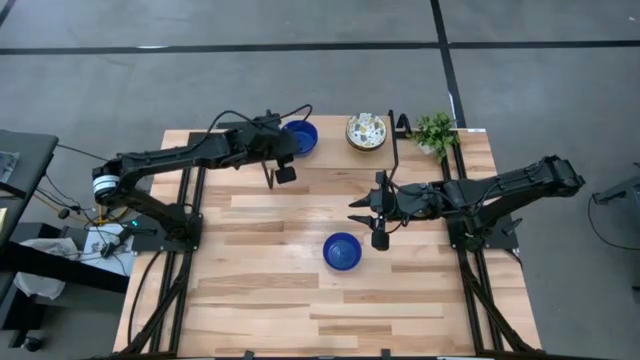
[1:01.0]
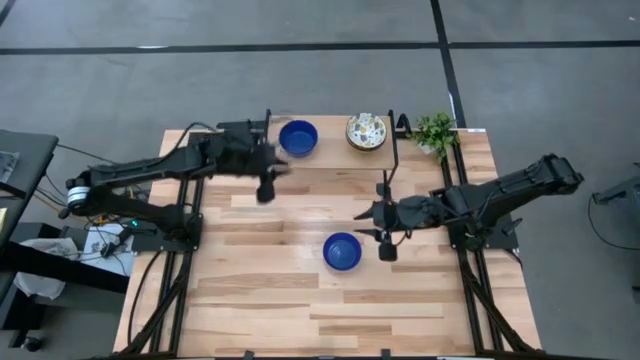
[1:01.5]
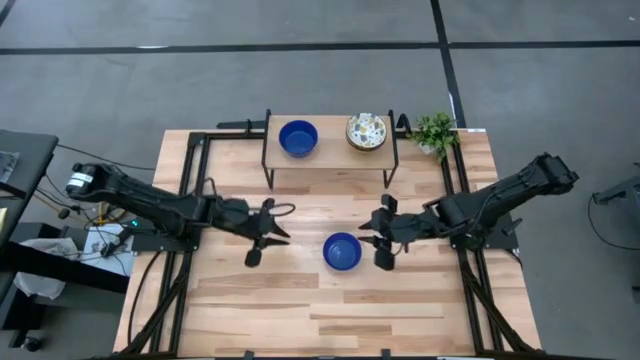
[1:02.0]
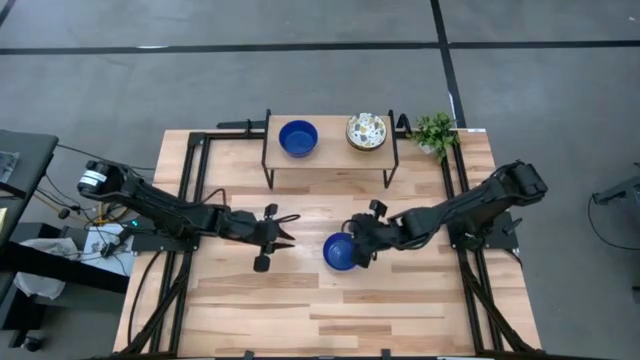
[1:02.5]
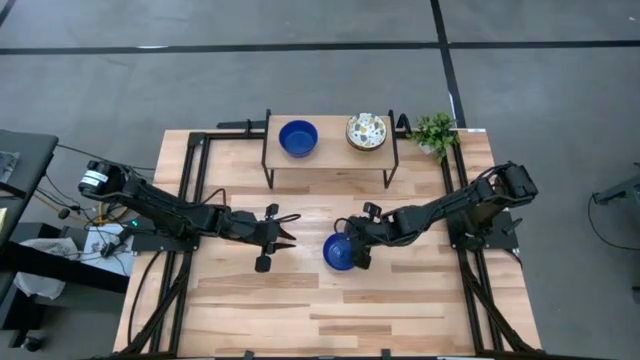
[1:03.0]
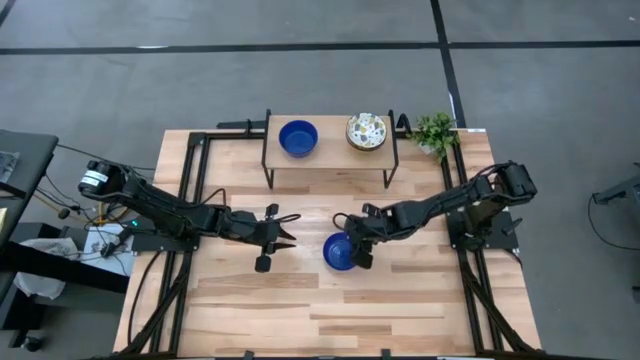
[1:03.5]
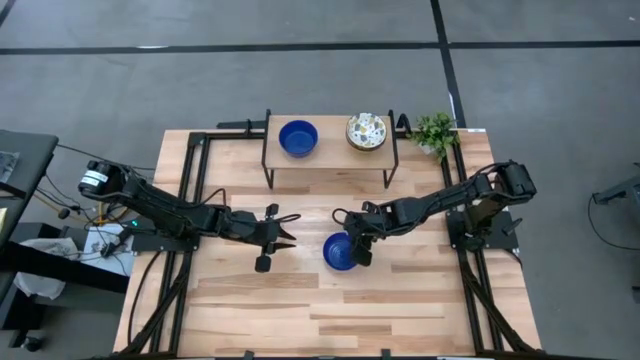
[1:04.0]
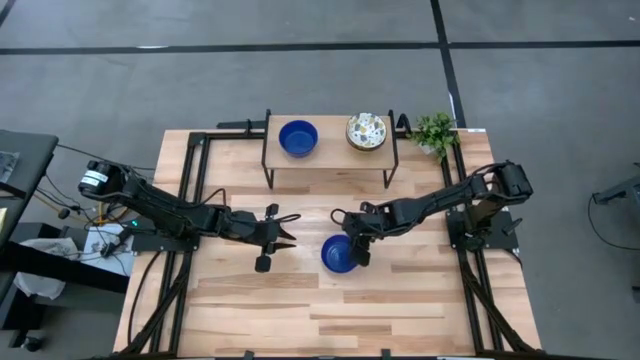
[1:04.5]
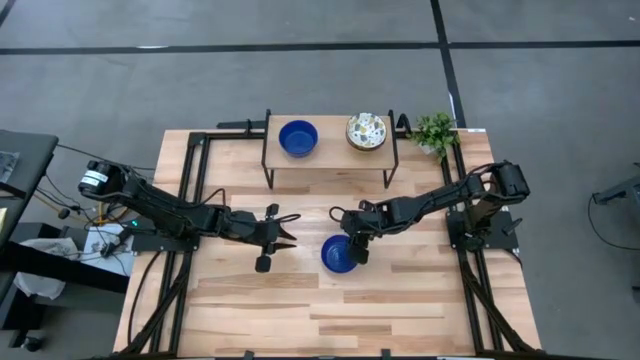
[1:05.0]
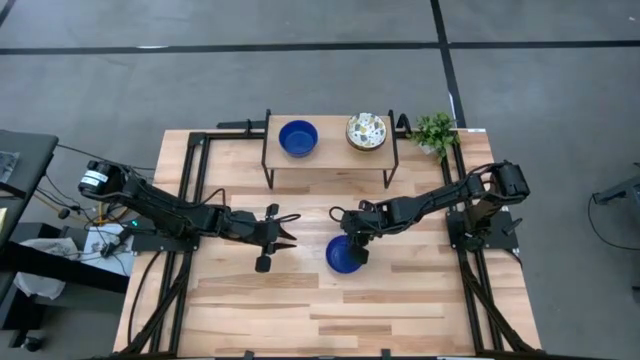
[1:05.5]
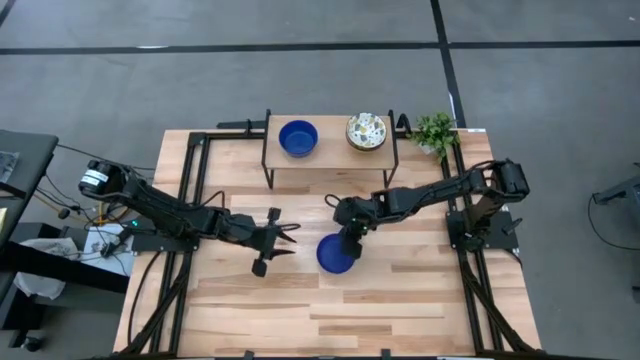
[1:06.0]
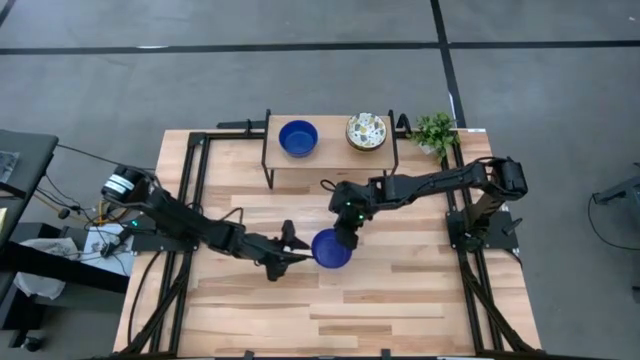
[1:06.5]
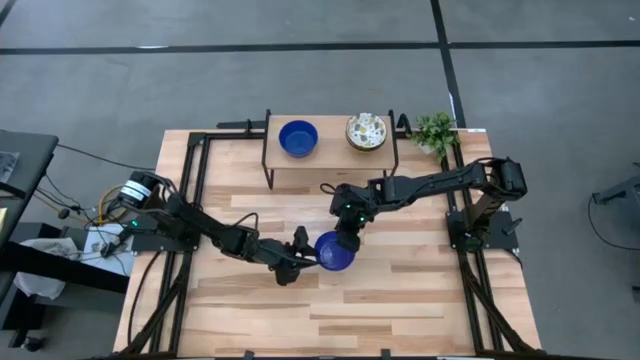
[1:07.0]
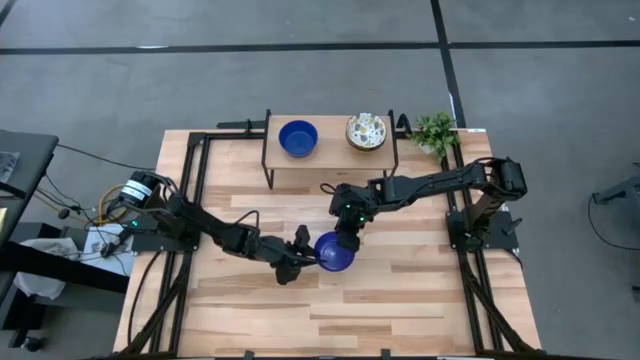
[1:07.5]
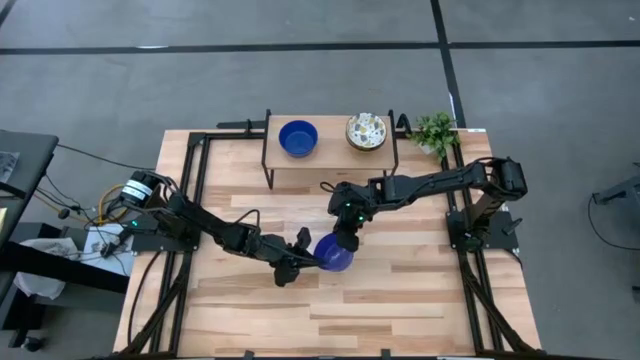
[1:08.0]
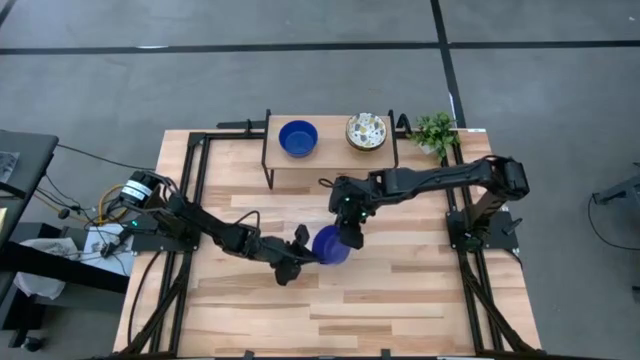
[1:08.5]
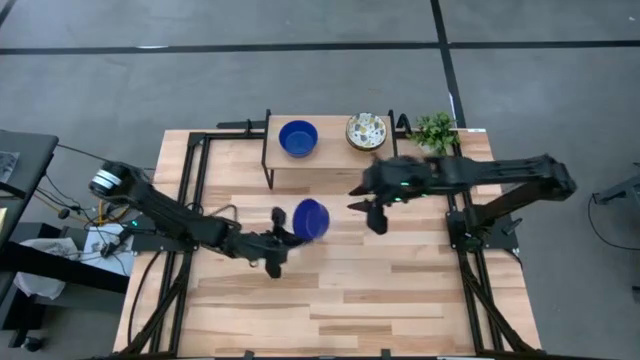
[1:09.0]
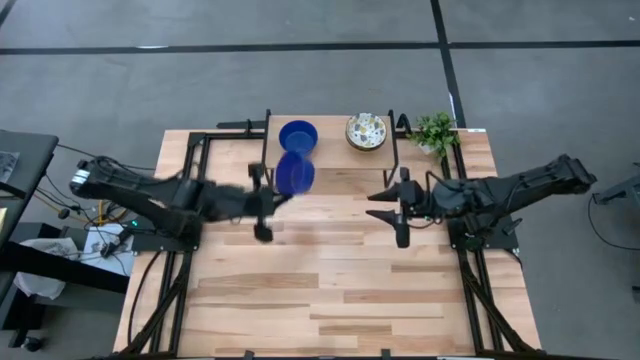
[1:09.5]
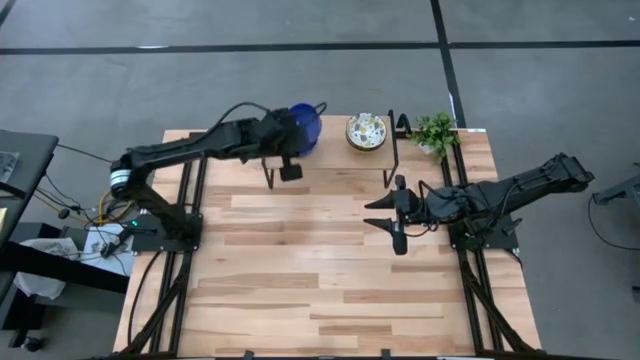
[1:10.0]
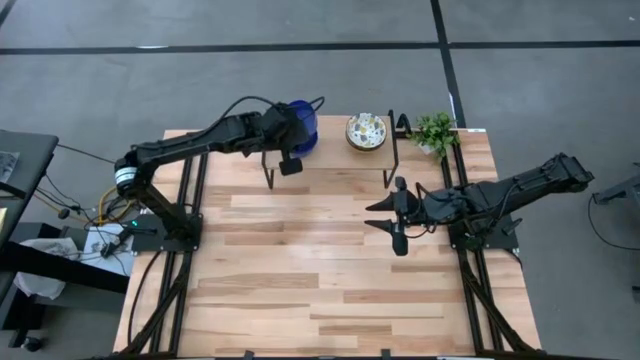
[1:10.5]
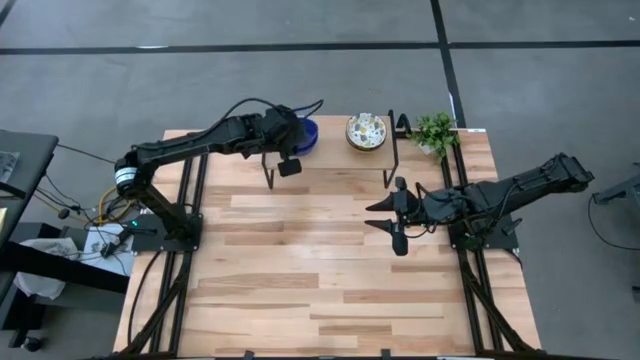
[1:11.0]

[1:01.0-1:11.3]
Task: Pick & Place Mini bowls
Stack the blue bowl on top of the blue bowls on the shelf

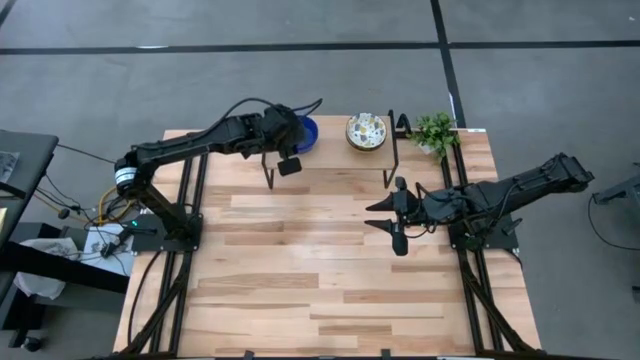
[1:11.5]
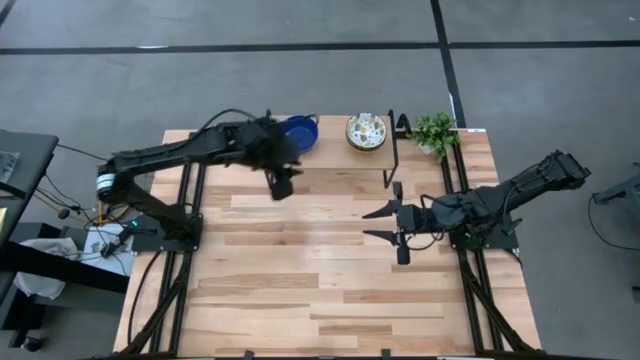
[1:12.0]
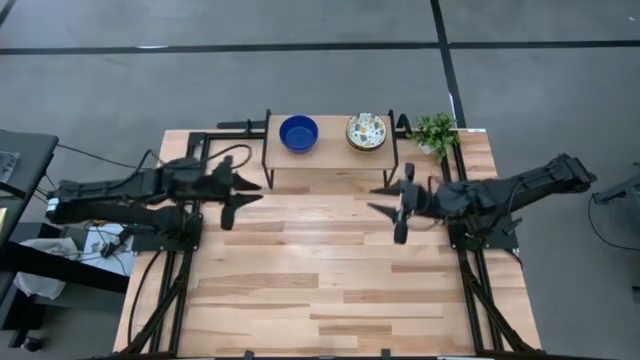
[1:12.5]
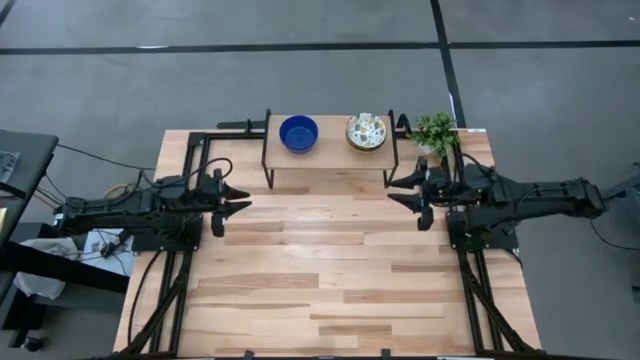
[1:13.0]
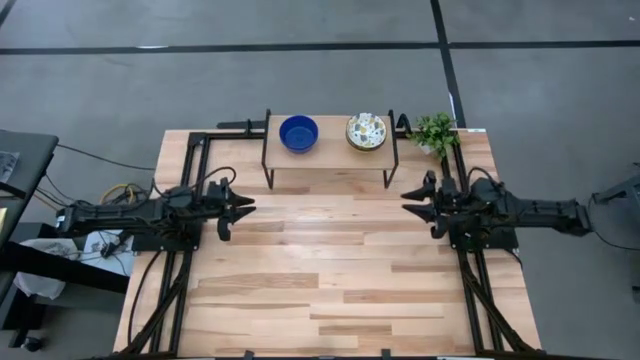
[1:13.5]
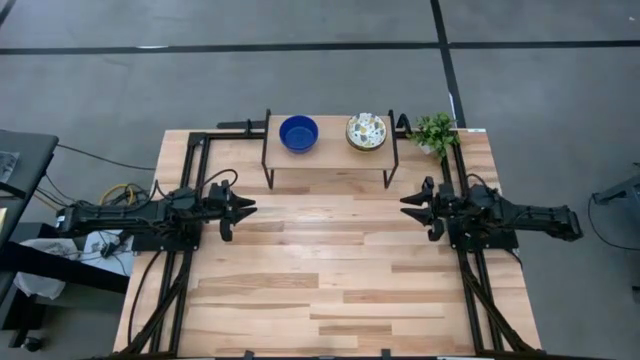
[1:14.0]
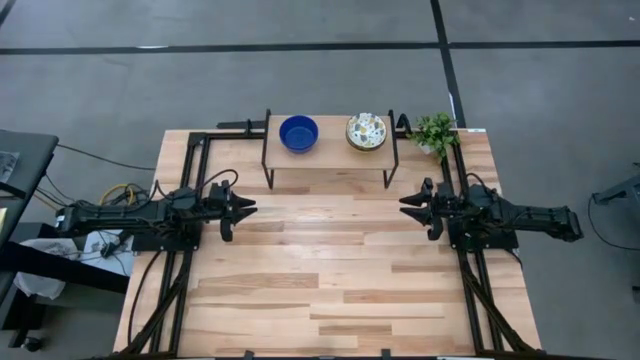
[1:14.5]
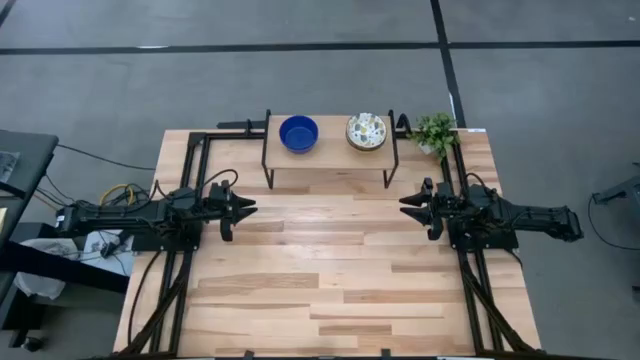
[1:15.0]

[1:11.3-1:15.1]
Return to Home Position

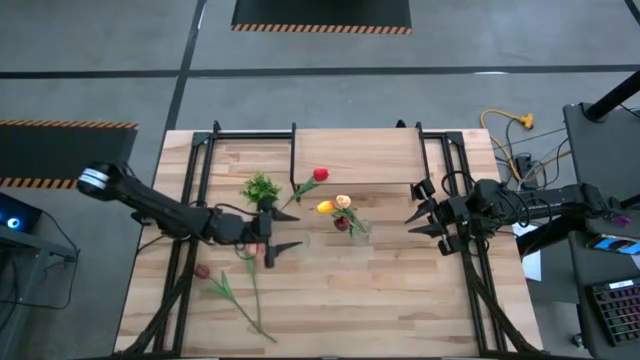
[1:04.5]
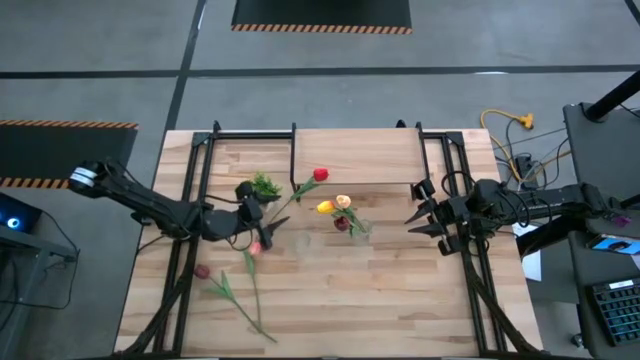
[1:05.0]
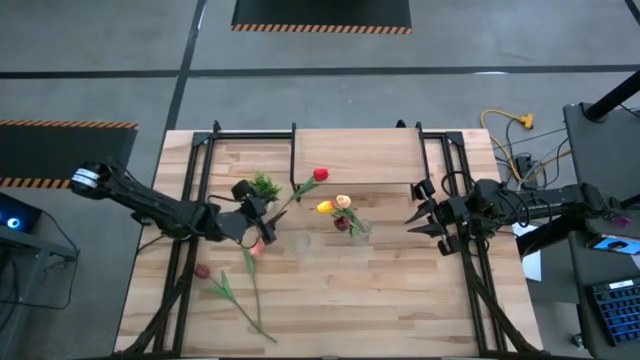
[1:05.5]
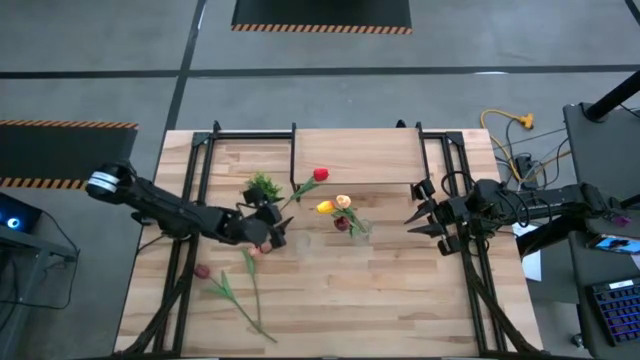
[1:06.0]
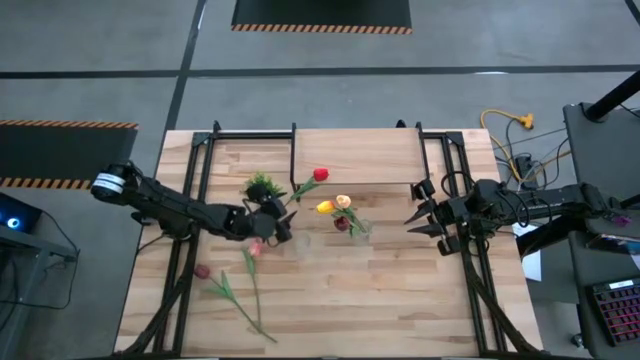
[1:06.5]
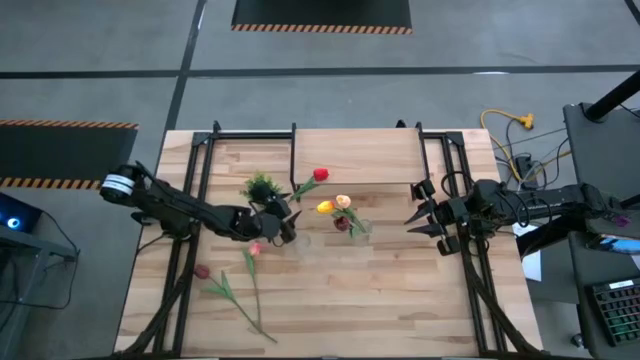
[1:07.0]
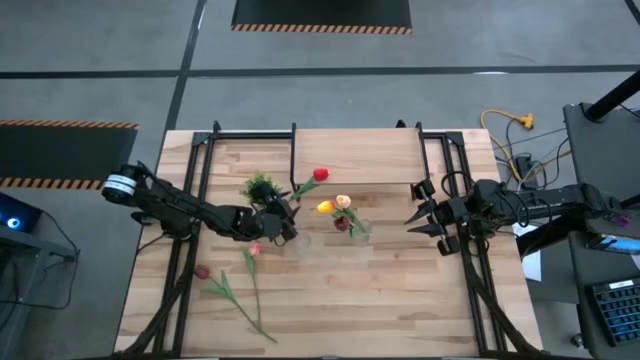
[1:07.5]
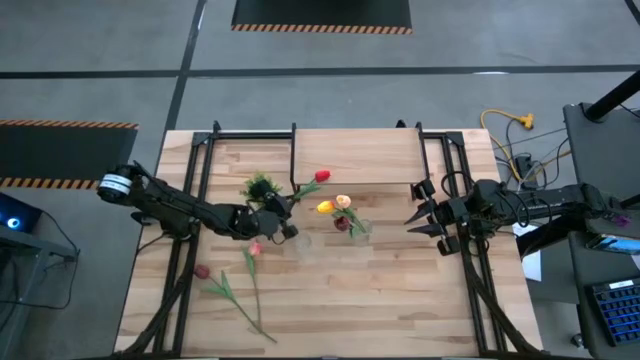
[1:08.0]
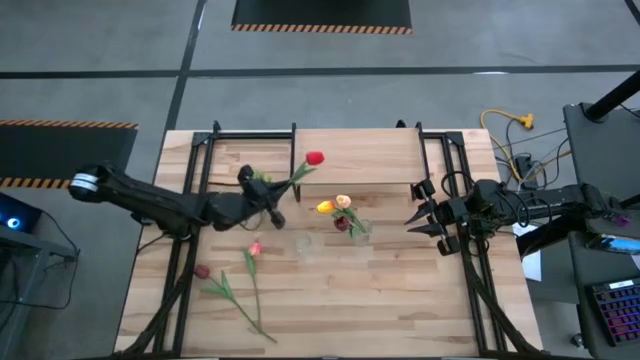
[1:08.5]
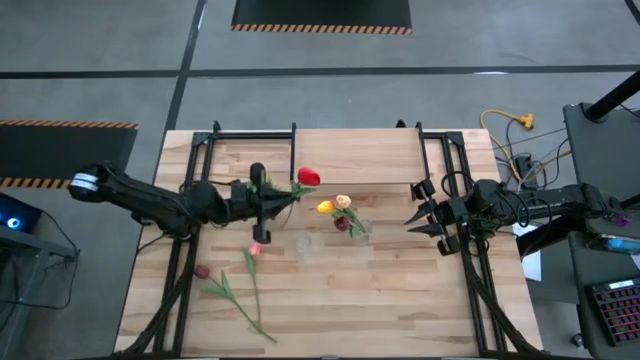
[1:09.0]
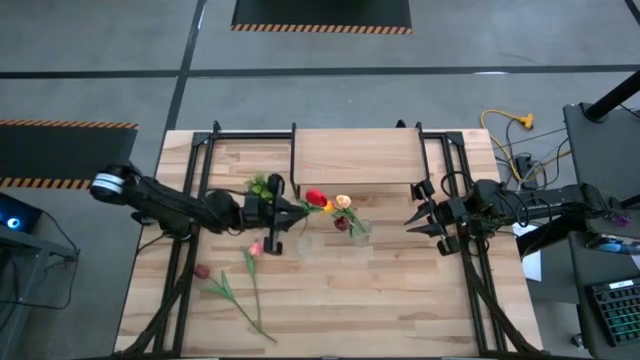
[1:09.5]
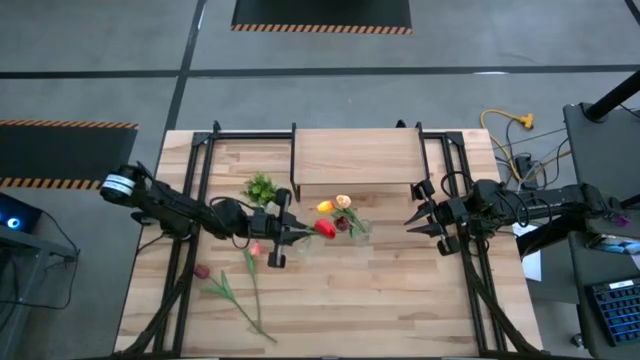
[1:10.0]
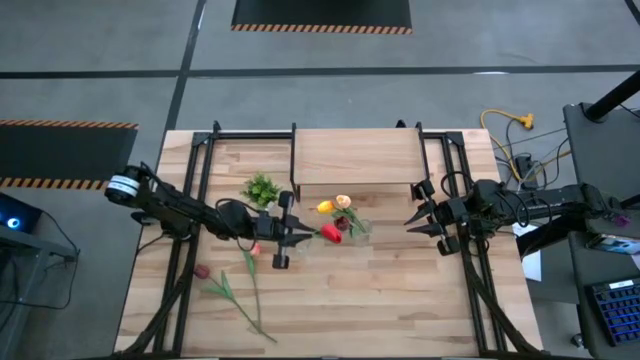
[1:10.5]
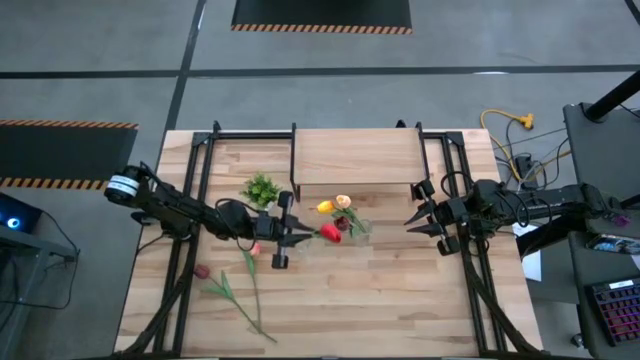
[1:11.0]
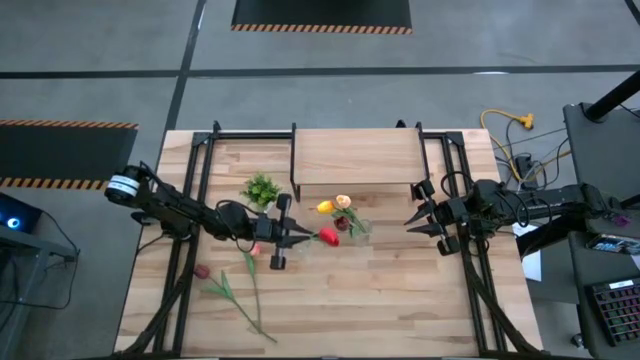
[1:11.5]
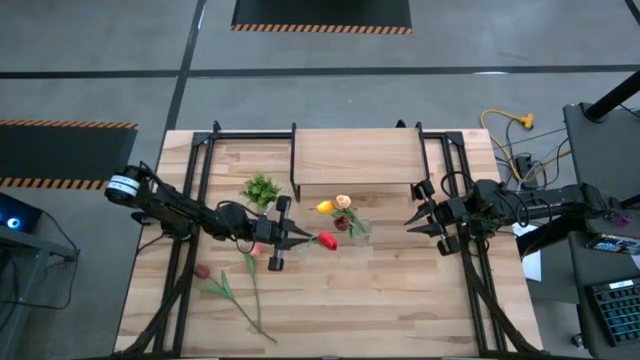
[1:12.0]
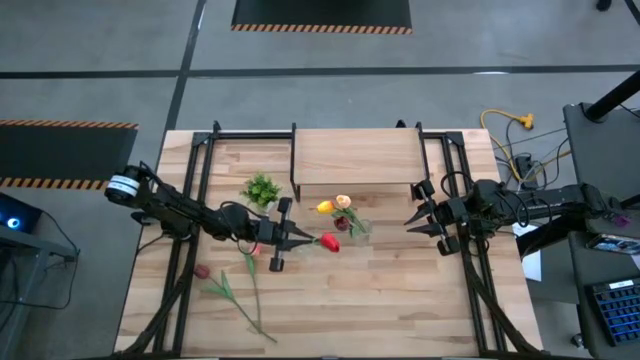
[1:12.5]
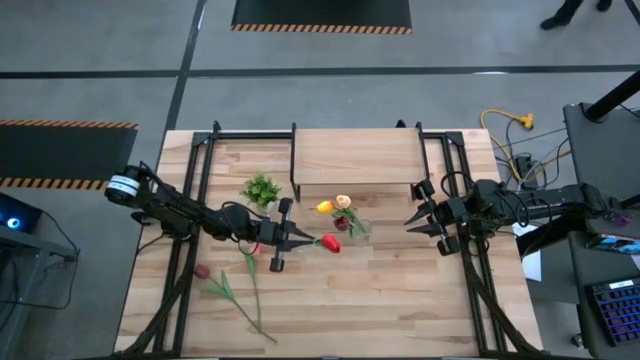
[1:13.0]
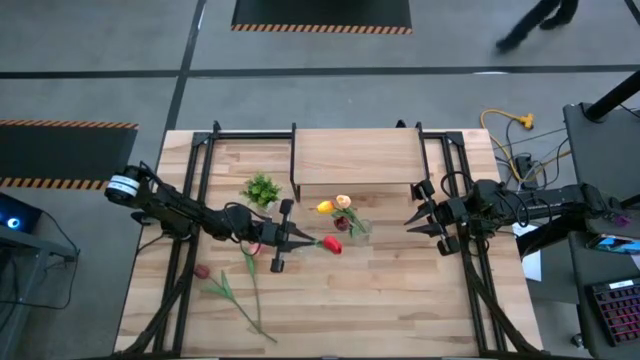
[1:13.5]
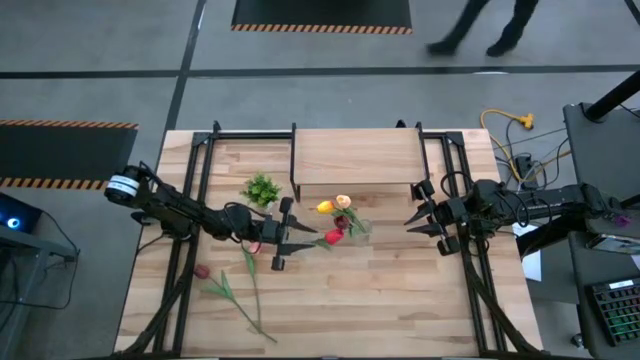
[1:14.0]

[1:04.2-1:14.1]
Task: Pick and place flowers into a vace then onto a shelf
Put the red tulip into the left transparent vase
